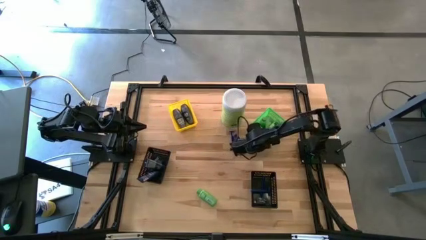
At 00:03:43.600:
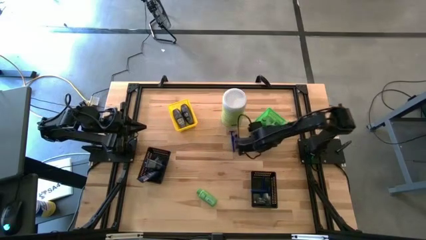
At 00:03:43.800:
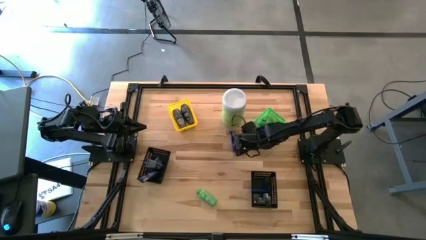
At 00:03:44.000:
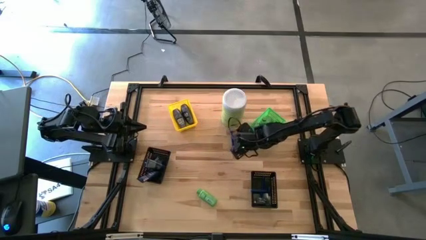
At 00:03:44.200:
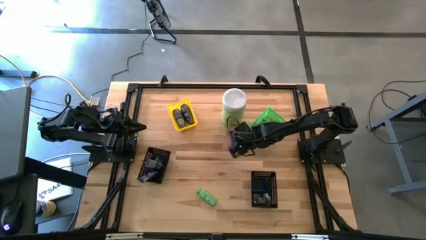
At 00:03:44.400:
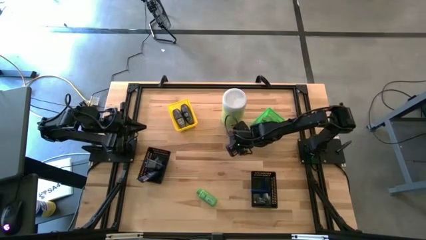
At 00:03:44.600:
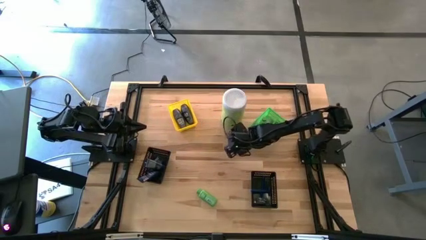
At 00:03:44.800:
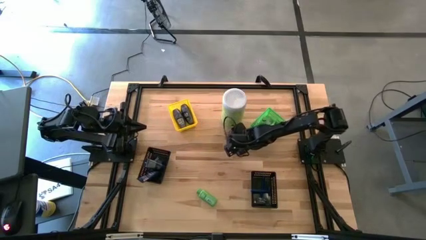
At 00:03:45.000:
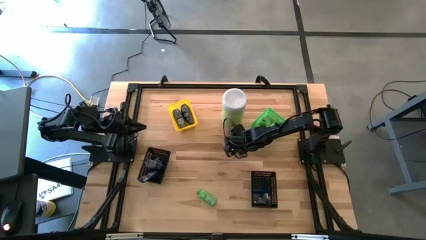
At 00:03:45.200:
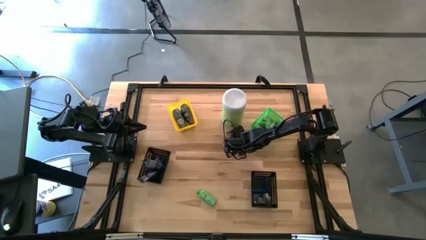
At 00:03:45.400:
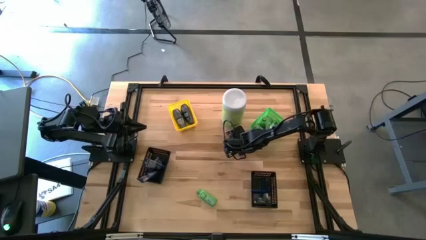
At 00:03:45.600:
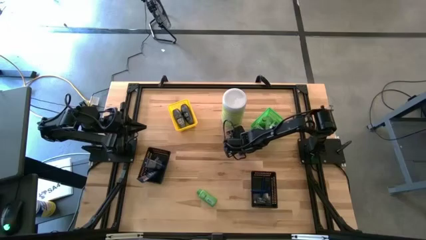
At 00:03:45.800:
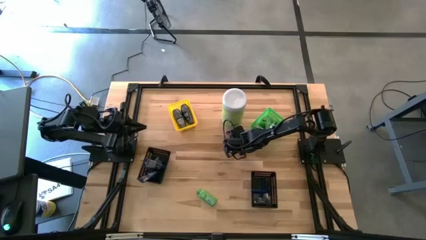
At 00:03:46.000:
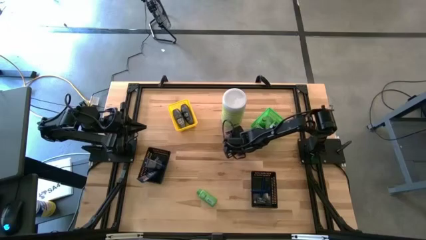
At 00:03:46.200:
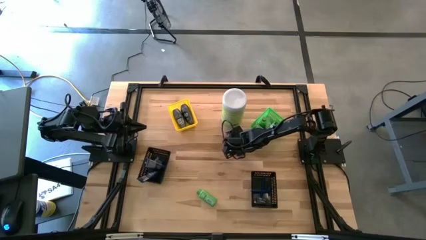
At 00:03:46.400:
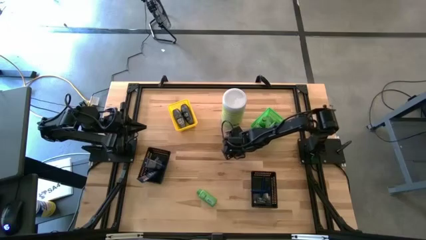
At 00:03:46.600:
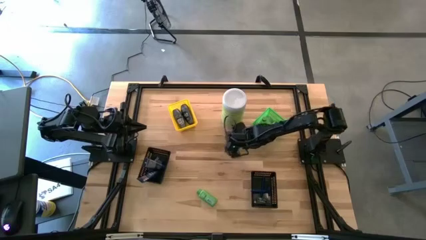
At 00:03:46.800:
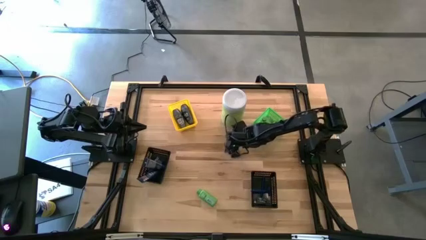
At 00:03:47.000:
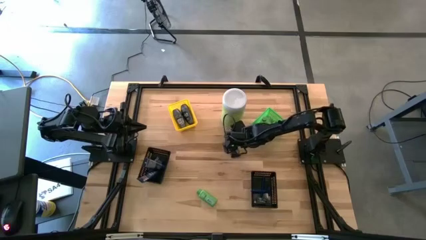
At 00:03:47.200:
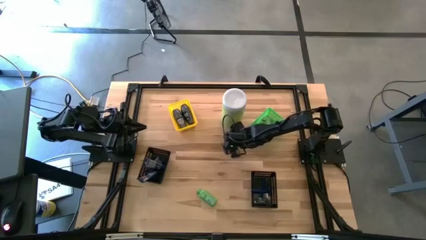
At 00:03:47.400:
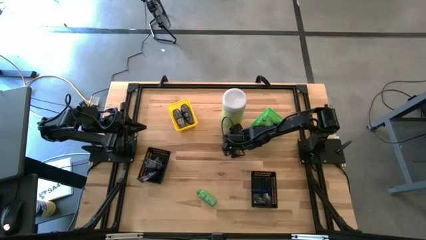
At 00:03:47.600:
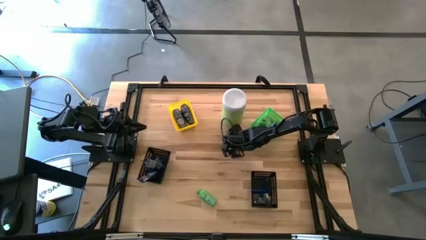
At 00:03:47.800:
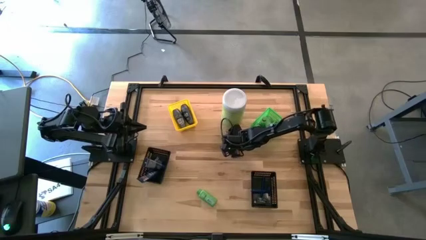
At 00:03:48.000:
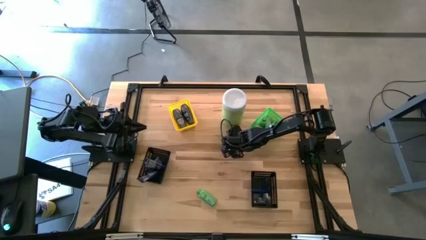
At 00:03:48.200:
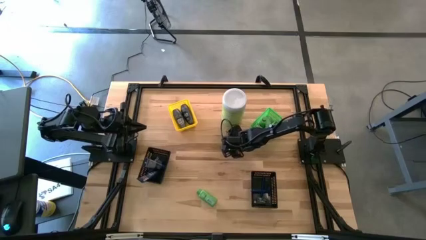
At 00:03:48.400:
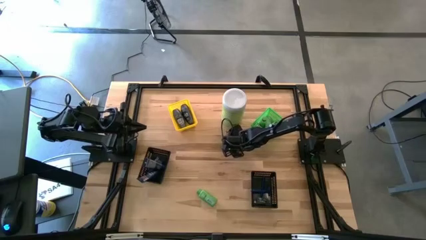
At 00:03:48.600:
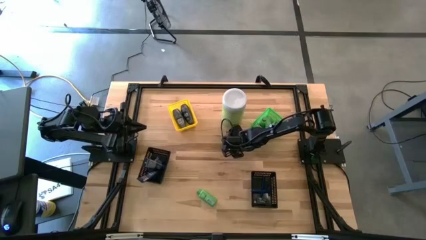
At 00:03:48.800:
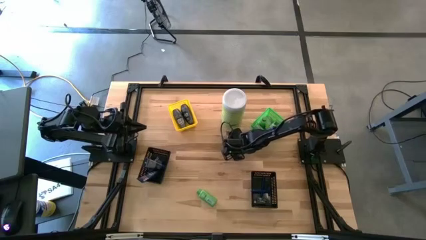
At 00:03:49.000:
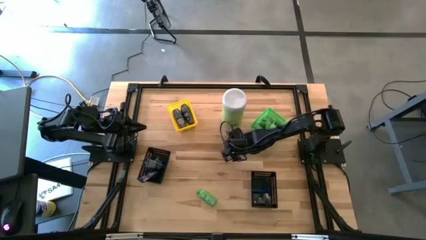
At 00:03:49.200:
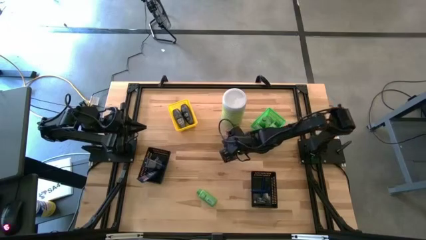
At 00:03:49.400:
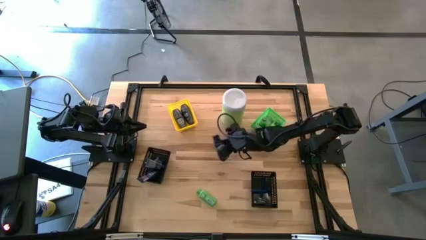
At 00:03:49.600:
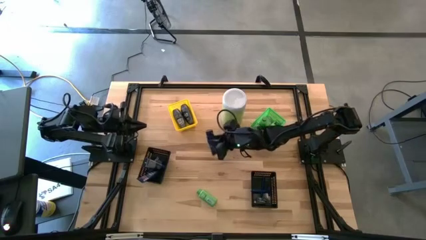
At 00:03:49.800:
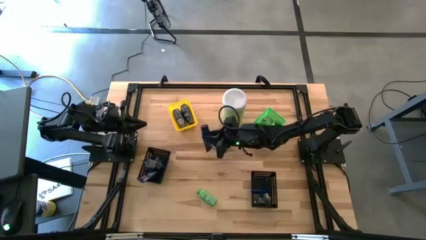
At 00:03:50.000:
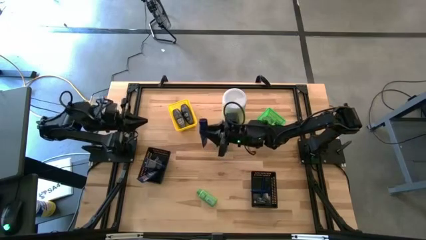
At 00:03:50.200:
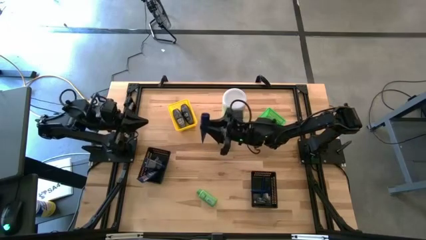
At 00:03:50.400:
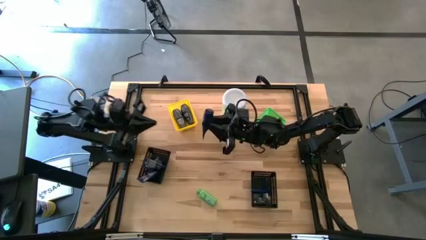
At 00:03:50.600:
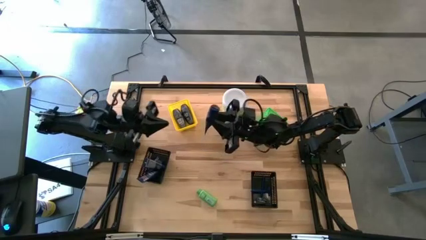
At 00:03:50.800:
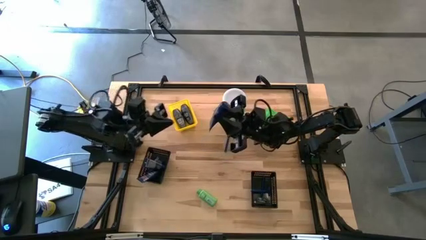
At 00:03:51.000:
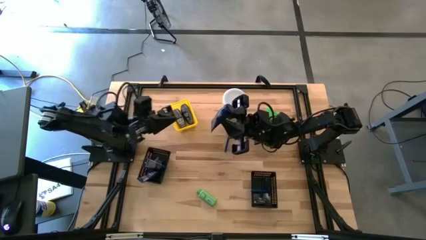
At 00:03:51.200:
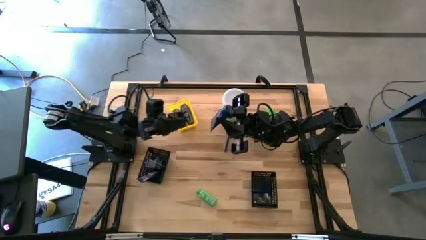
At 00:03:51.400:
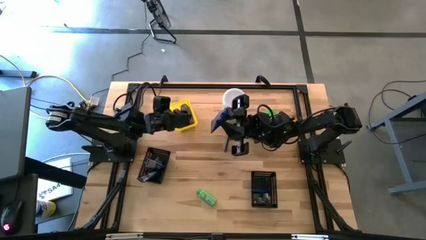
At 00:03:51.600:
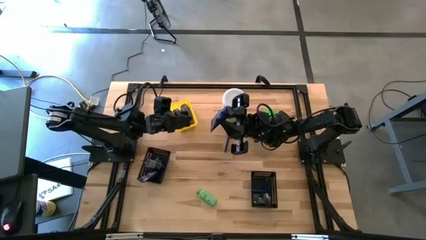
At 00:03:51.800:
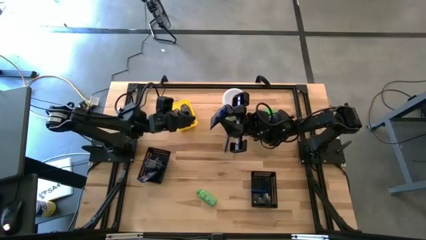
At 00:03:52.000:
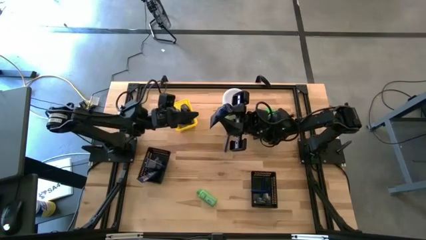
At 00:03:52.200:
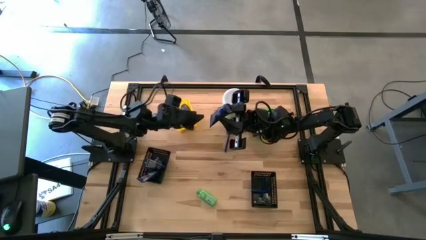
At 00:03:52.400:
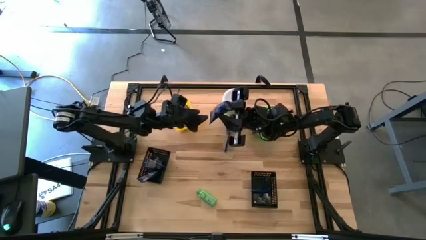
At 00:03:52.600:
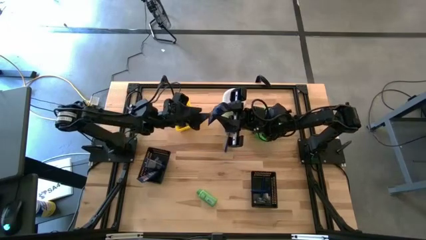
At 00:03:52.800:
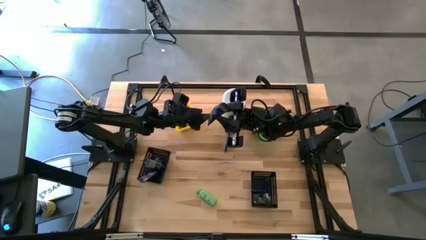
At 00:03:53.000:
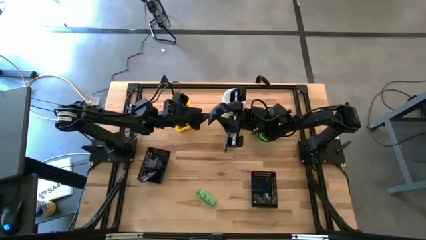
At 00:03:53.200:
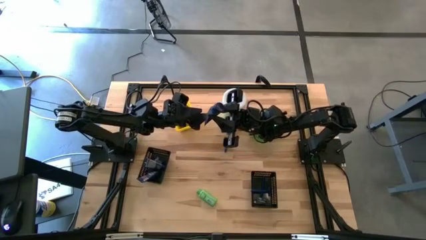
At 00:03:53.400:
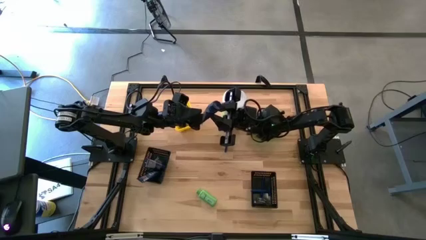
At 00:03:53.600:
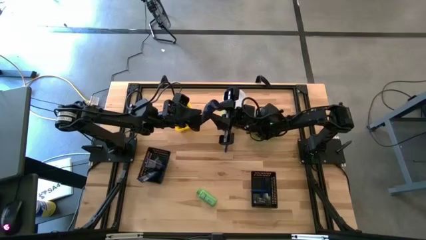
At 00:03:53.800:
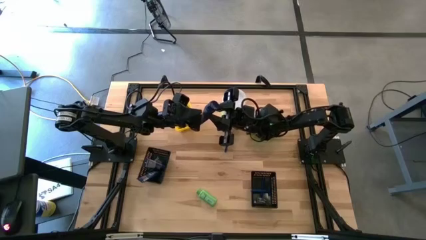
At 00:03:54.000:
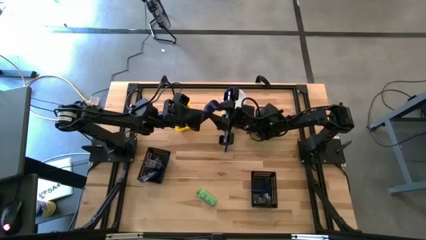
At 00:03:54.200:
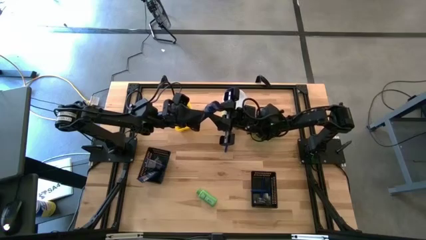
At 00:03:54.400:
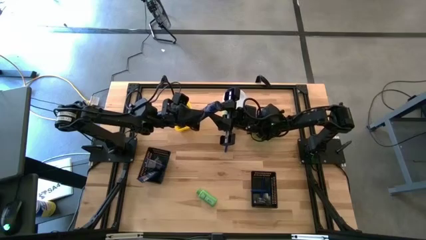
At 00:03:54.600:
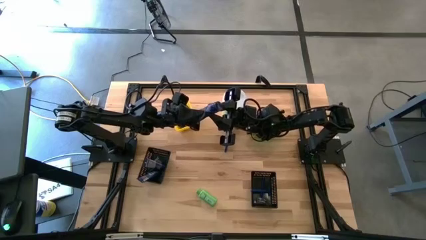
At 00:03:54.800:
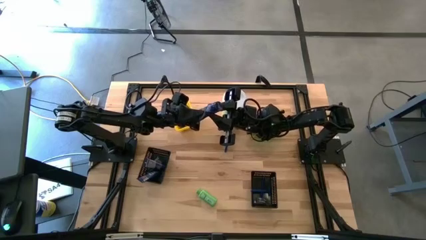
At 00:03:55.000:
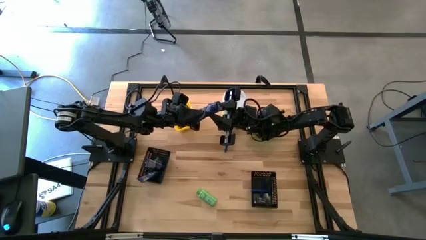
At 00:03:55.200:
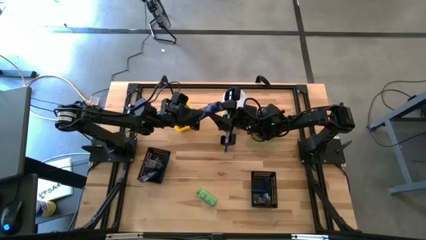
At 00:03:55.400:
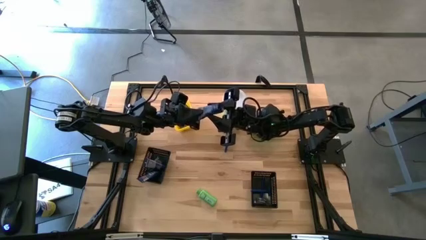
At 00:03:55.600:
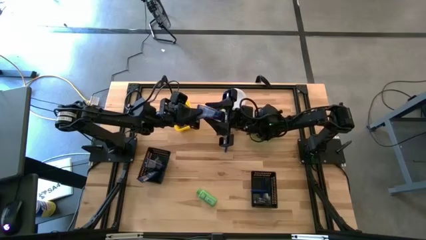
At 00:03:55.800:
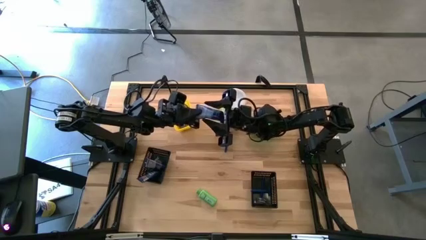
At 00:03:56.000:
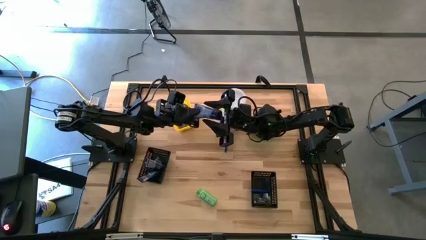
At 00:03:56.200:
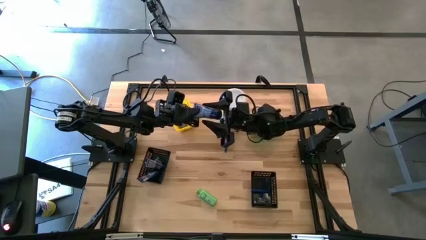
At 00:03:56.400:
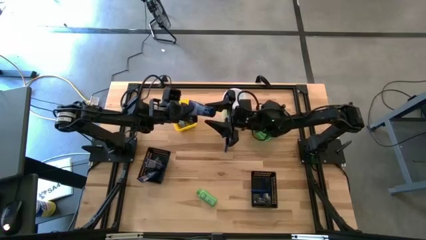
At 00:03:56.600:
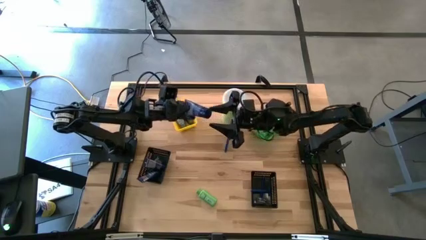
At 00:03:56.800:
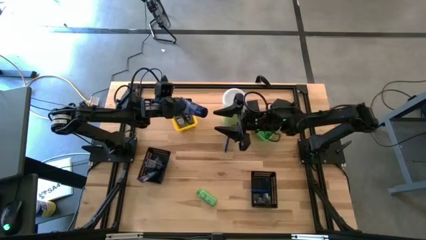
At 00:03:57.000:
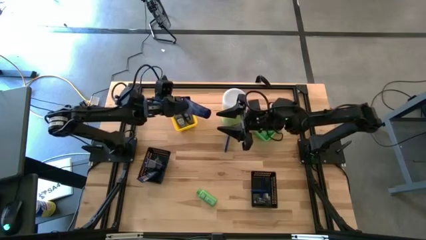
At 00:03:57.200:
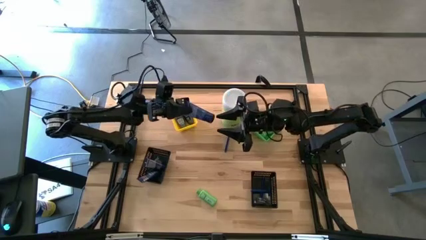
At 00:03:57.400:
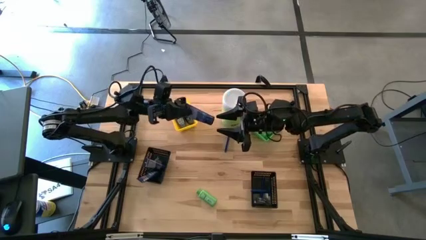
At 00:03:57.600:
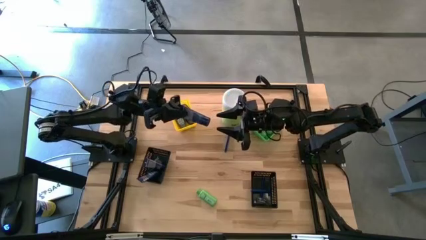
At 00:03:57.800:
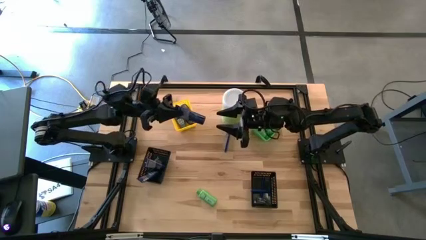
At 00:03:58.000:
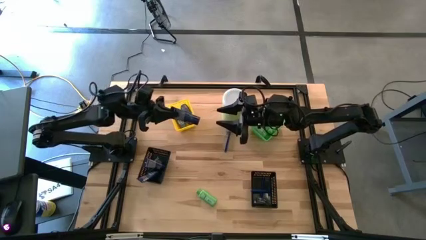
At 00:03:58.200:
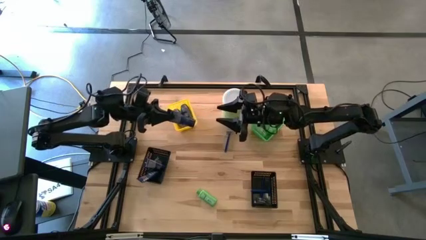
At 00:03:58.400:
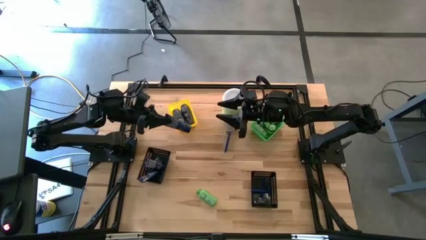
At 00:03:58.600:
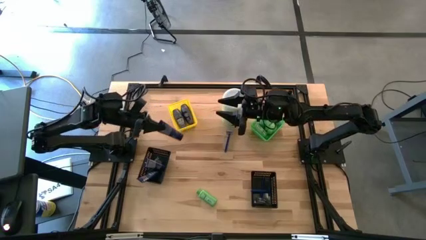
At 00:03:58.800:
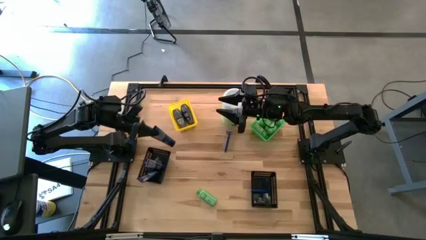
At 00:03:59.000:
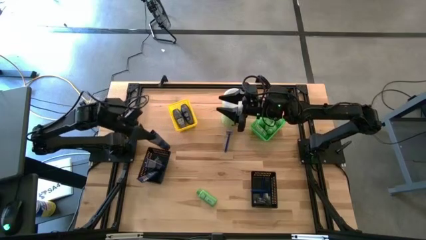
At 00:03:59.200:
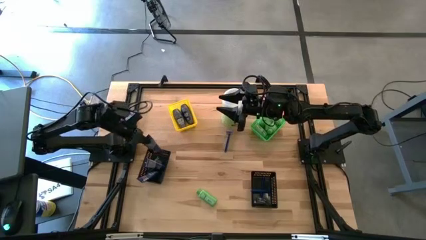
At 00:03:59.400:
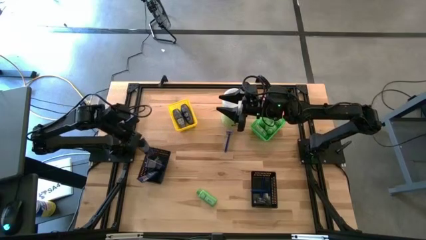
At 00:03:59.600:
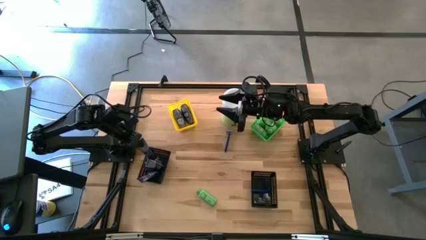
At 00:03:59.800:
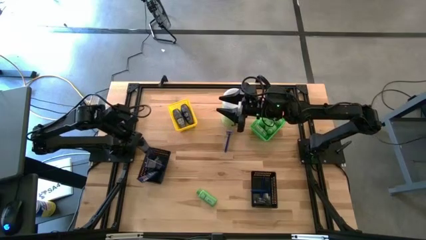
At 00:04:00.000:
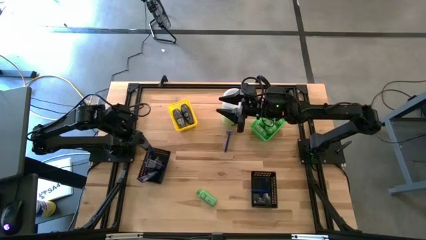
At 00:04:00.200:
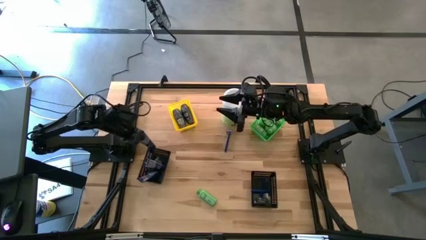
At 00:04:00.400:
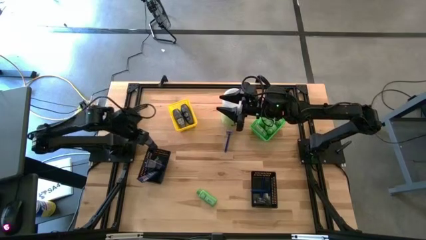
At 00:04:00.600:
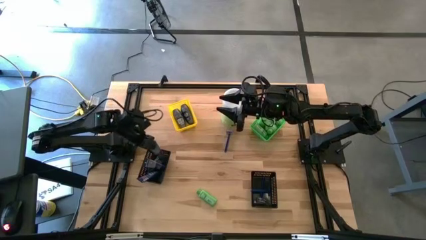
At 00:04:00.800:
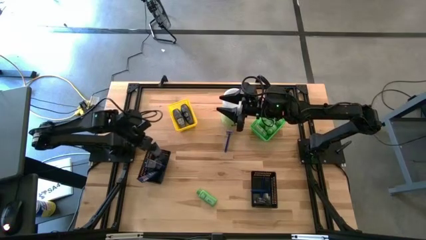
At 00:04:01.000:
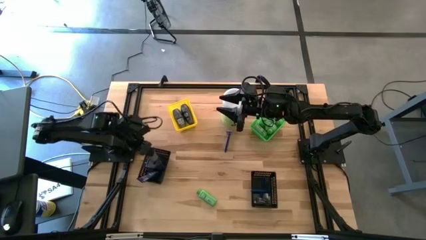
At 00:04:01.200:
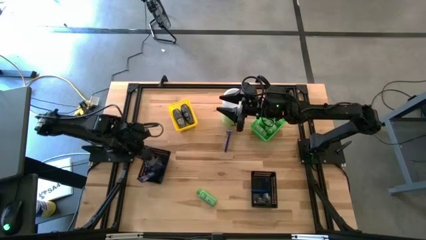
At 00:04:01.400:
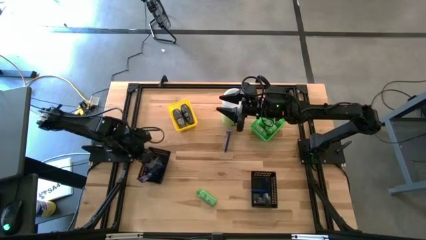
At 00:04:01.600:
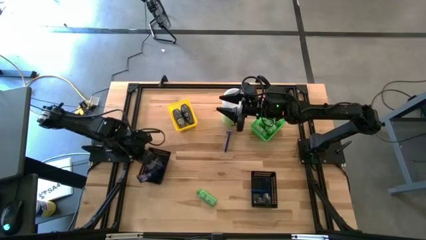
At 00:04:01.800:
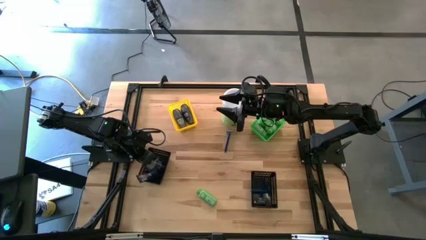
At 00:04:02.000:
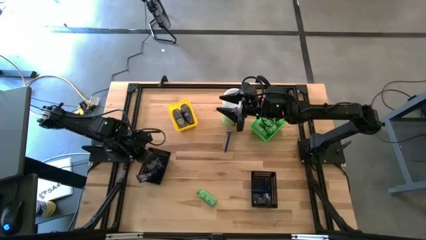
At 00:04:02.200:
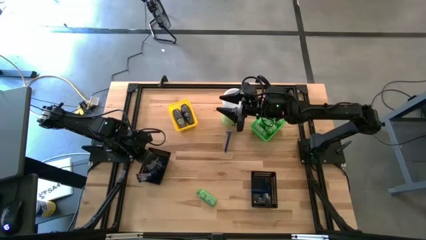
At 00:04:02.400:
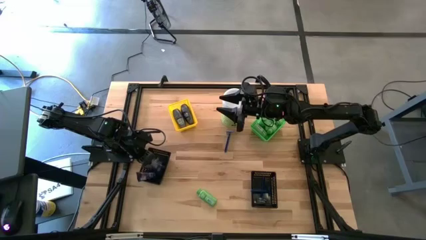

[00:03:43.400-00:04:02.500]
Task: Pick & Place Travel size toiletries
Put the shave cream into the left black bin
